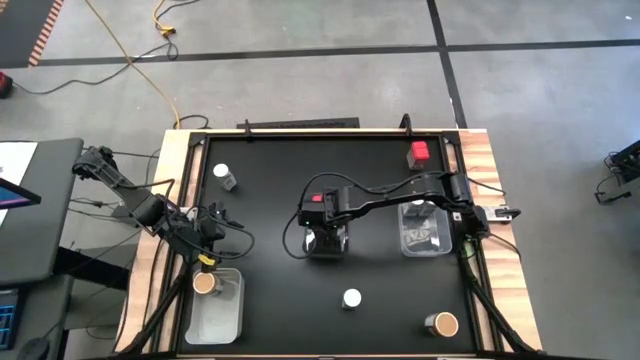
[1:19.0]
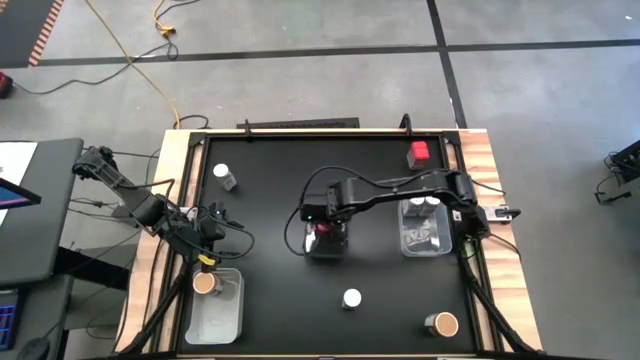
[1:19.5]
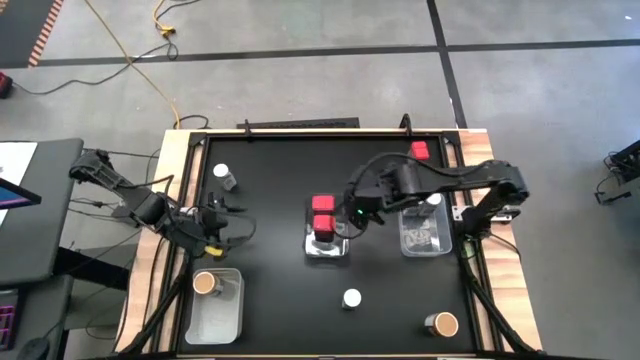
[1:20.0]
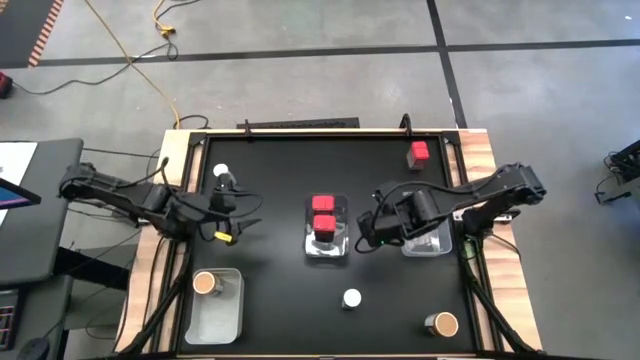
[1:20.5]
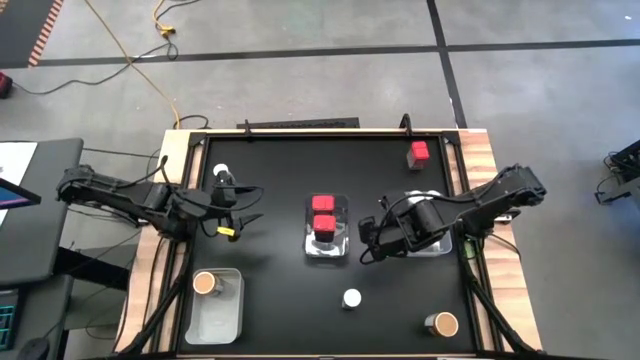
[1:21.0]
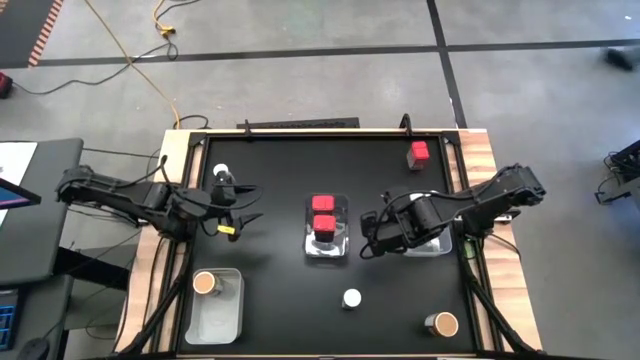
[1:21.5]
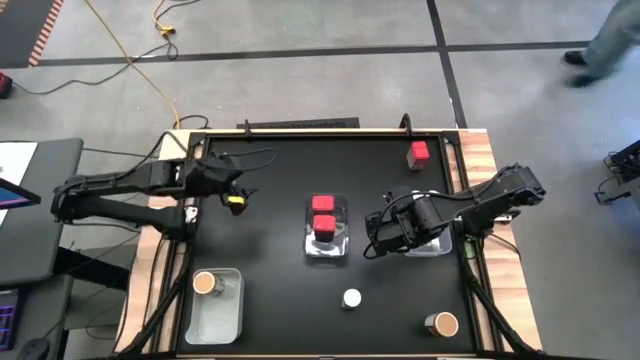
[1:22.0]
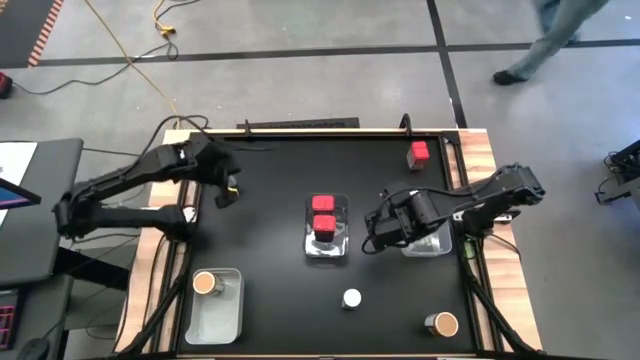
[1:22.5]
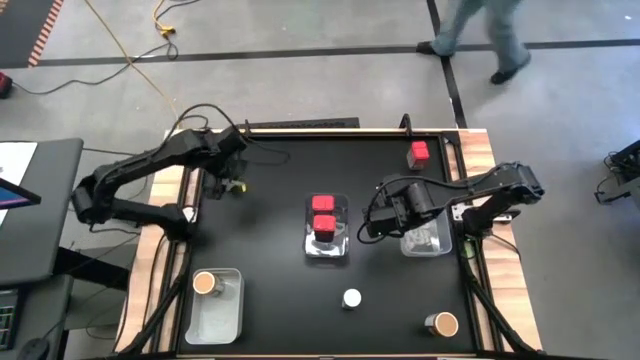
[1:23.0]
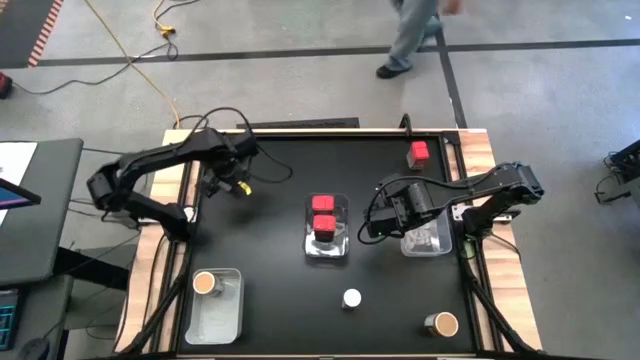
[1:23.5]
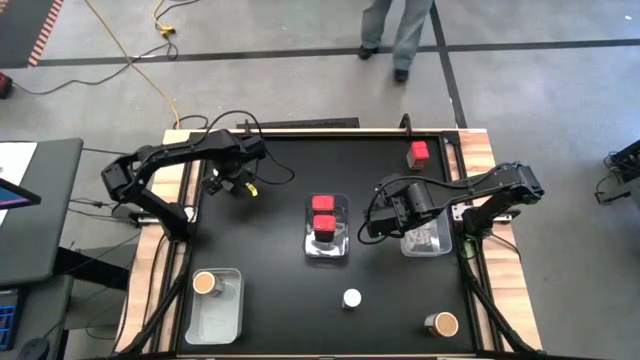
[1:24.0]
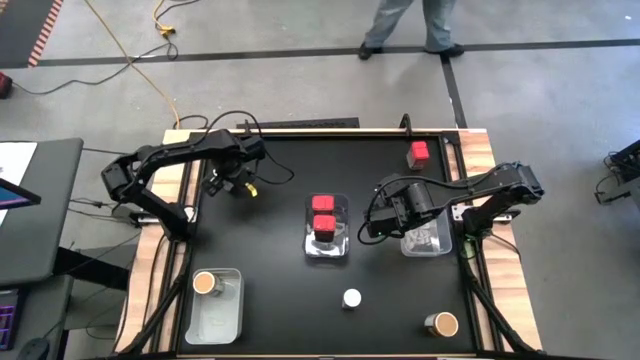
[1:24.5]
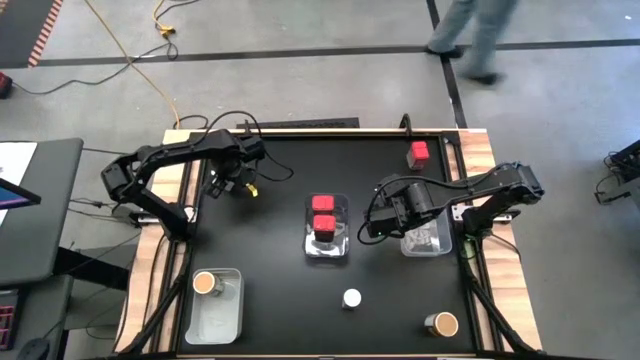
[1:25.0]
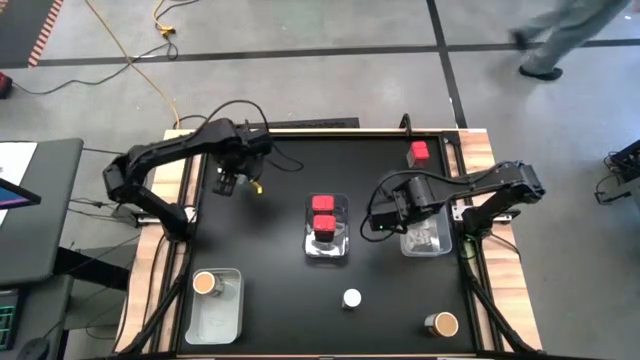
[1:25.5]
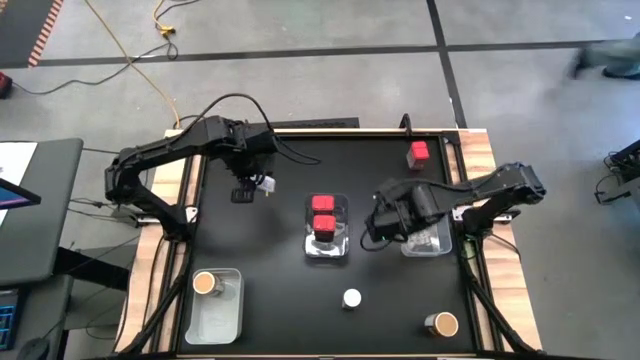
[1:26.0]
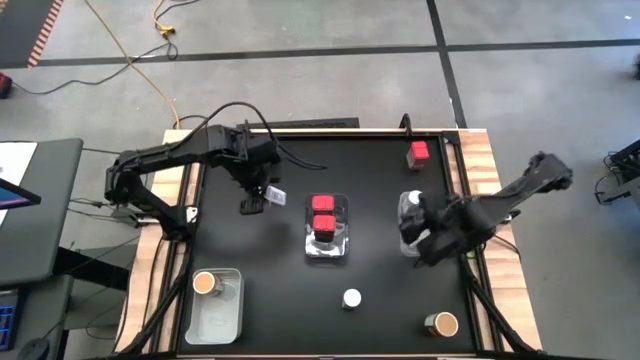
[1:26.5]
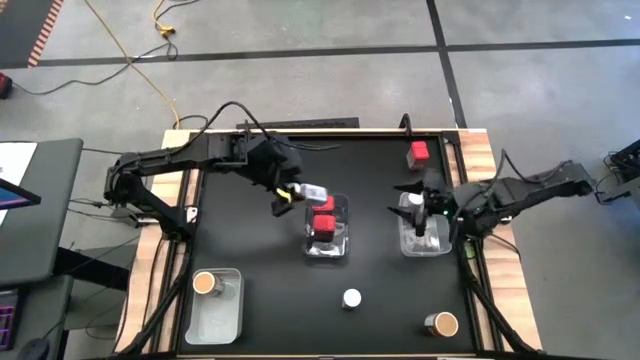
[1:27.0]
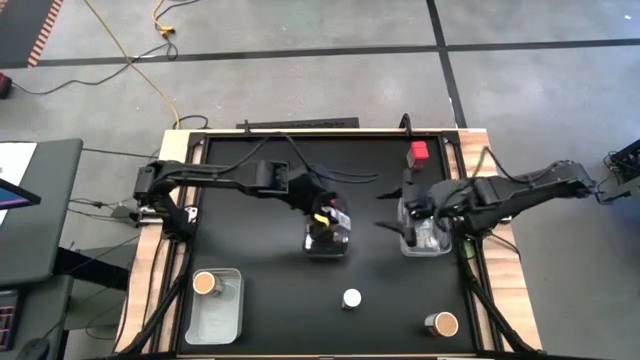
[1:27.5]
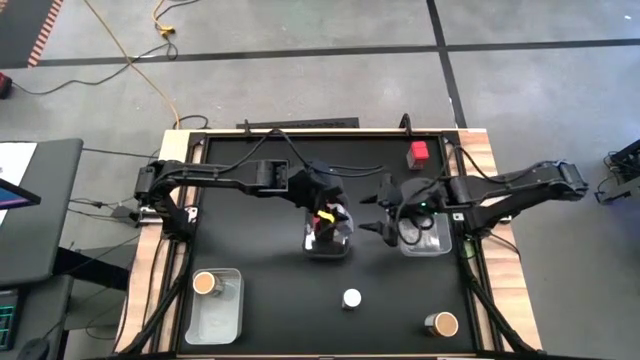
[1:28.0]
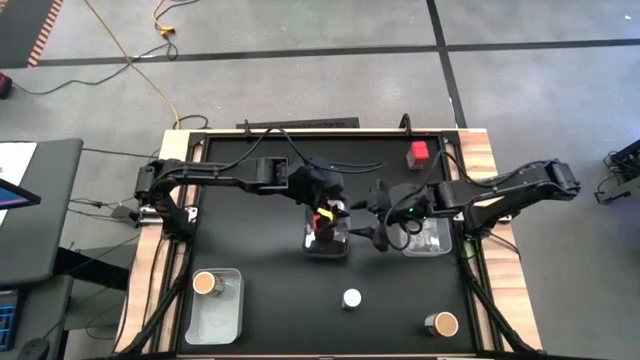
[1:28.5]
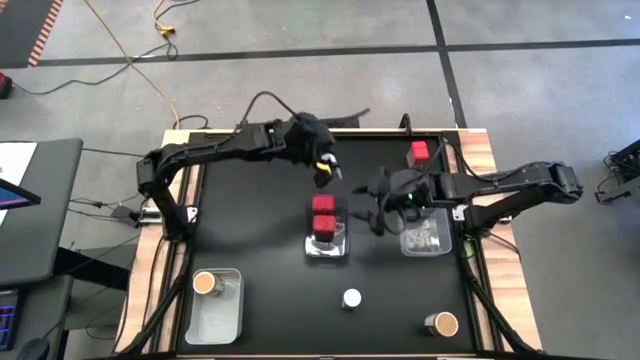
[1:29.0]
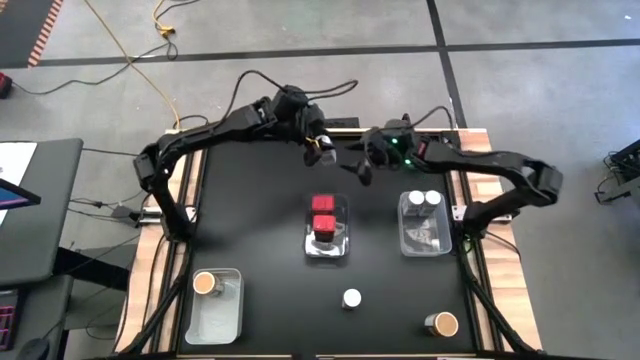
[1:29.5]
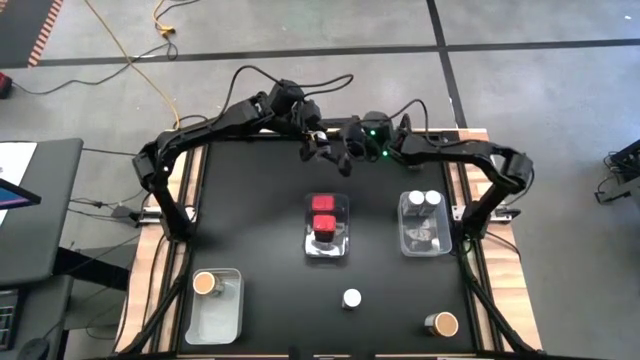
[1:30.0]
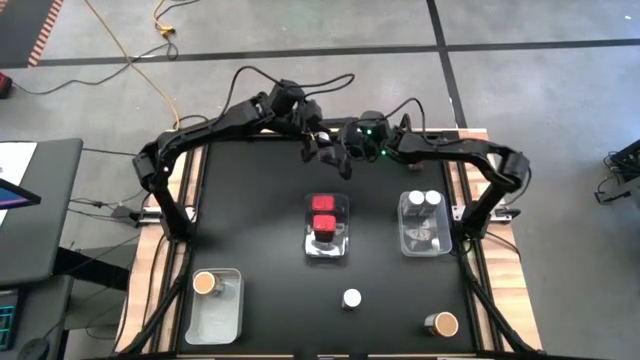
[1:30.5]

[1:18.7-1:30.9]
Task: Sort spices by type
Put the white seasoning bottle into the transparent bin

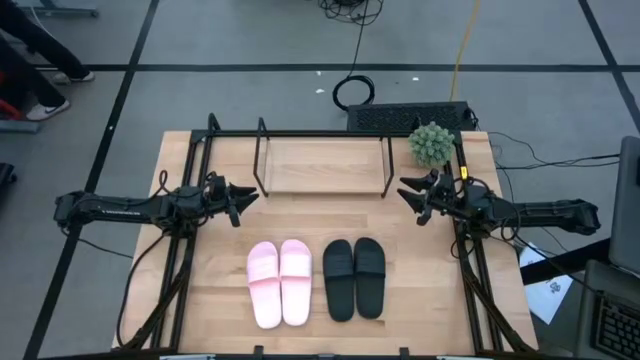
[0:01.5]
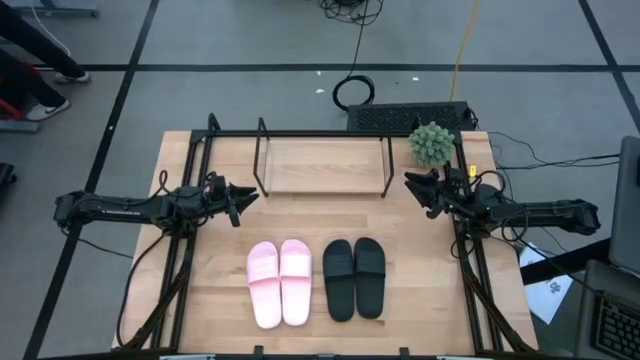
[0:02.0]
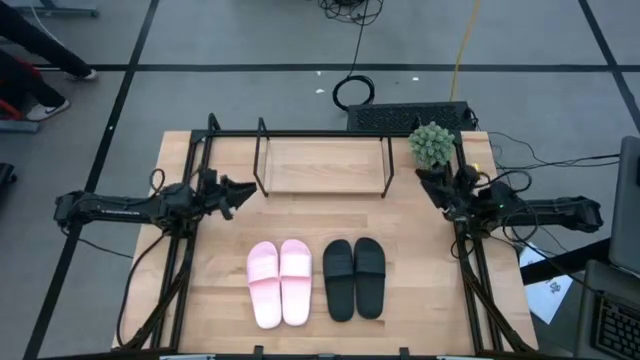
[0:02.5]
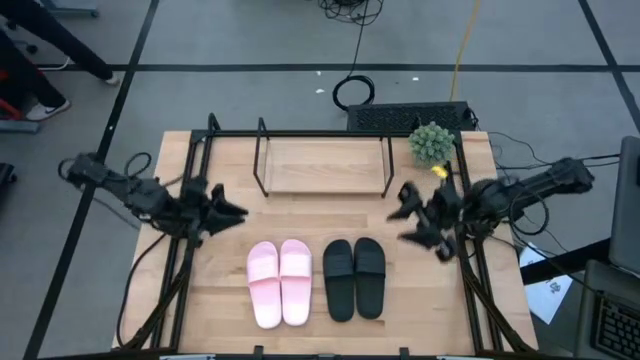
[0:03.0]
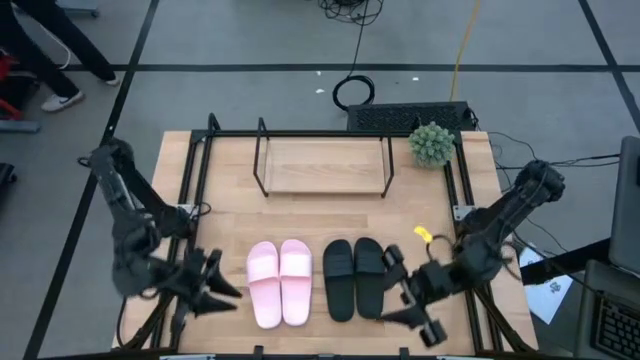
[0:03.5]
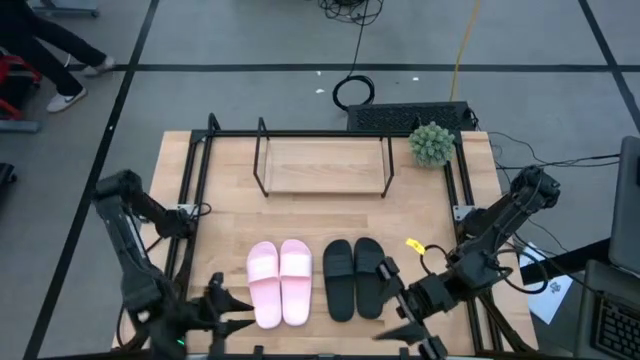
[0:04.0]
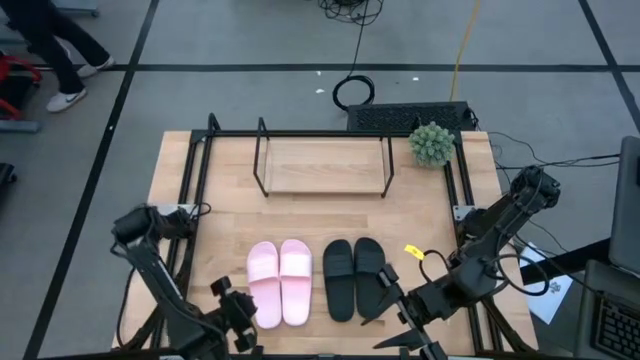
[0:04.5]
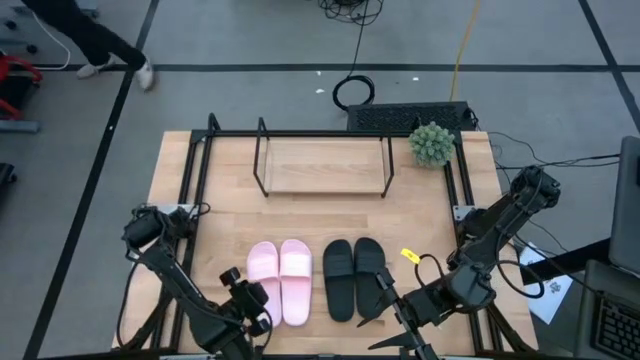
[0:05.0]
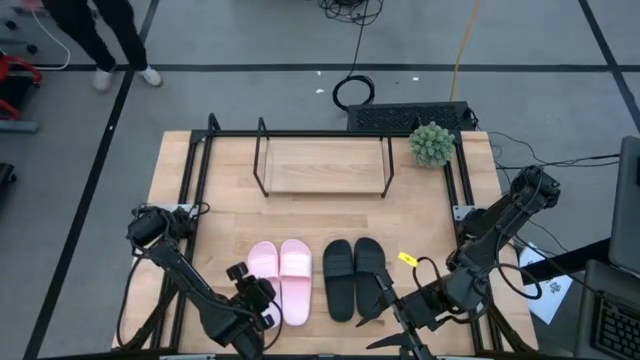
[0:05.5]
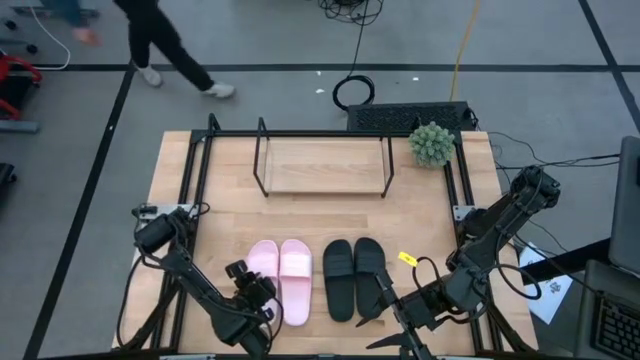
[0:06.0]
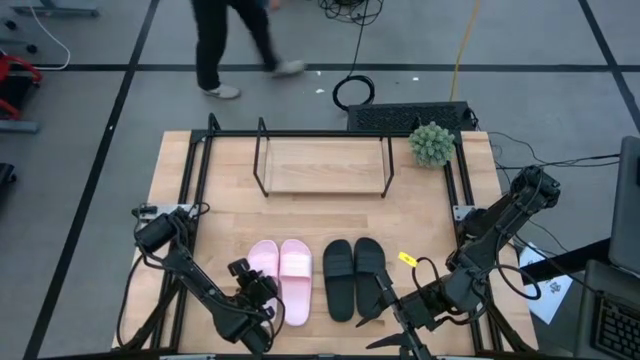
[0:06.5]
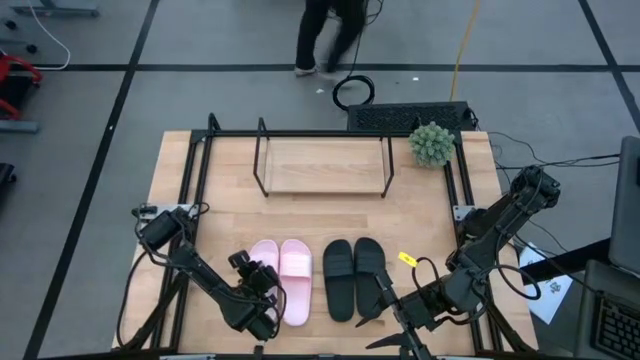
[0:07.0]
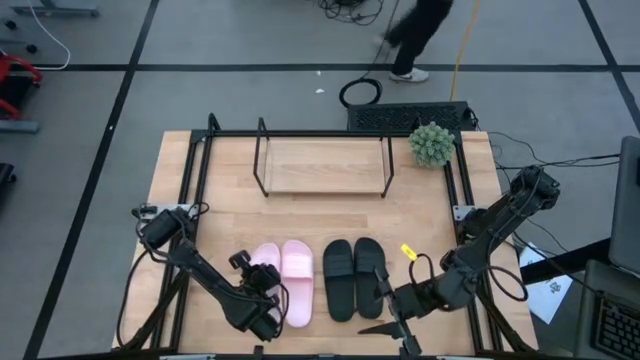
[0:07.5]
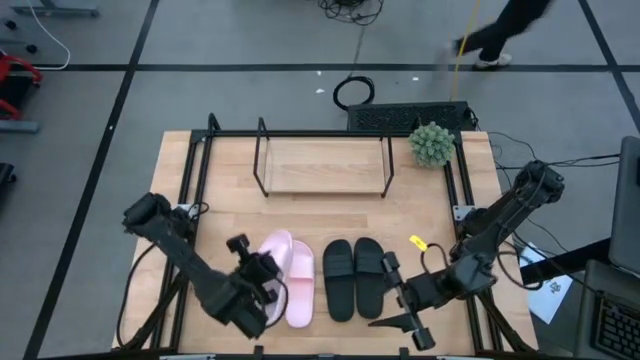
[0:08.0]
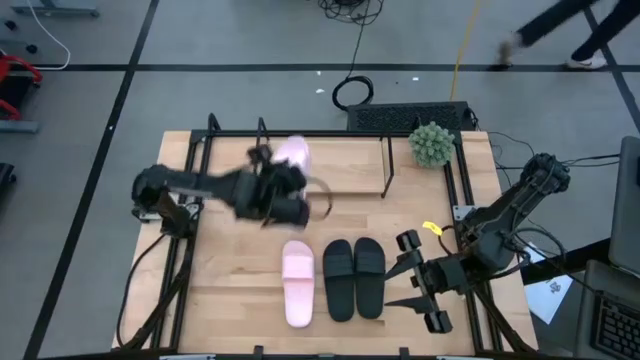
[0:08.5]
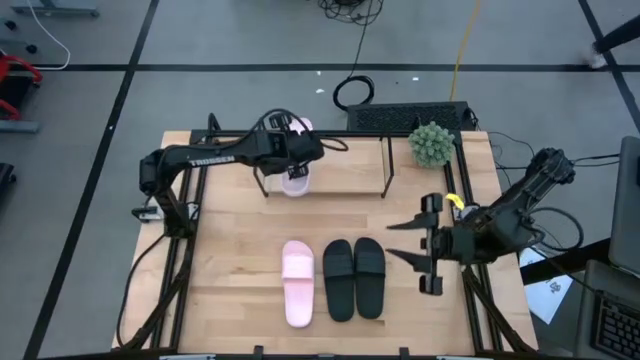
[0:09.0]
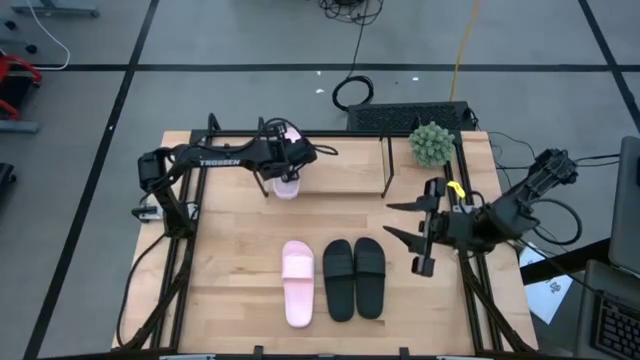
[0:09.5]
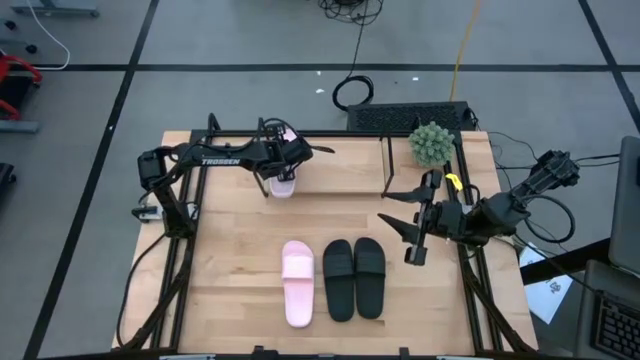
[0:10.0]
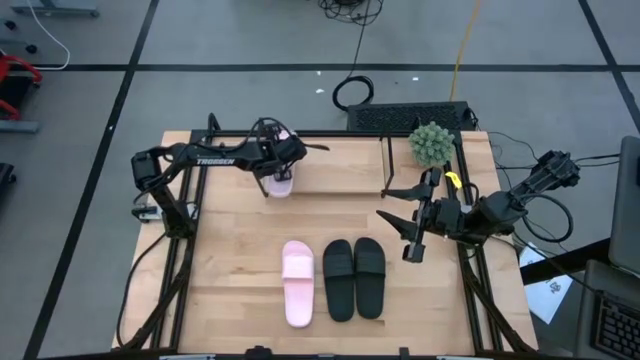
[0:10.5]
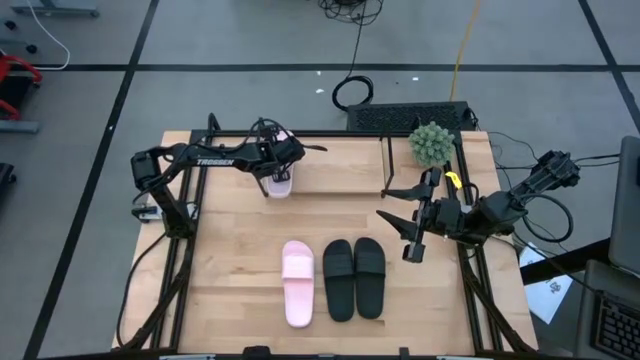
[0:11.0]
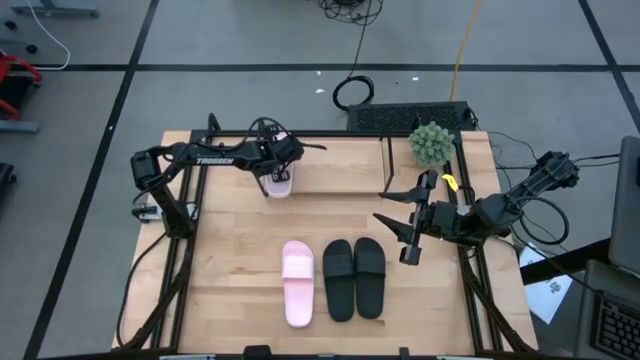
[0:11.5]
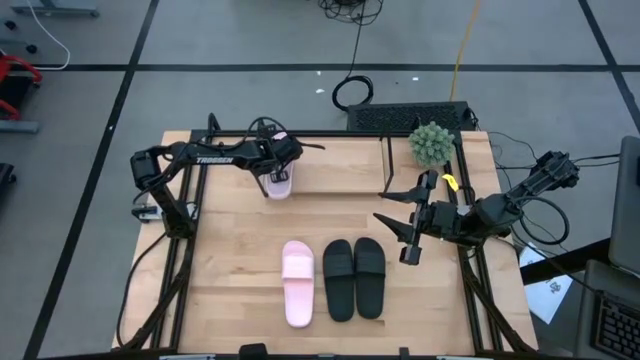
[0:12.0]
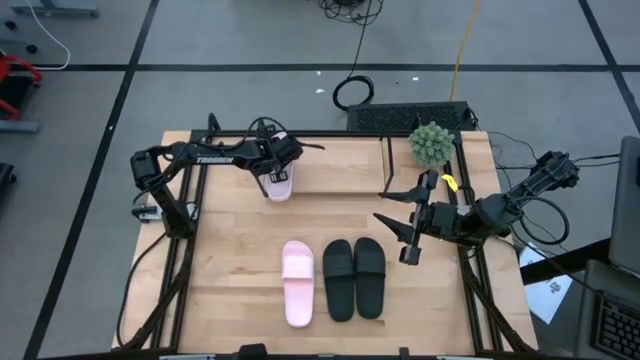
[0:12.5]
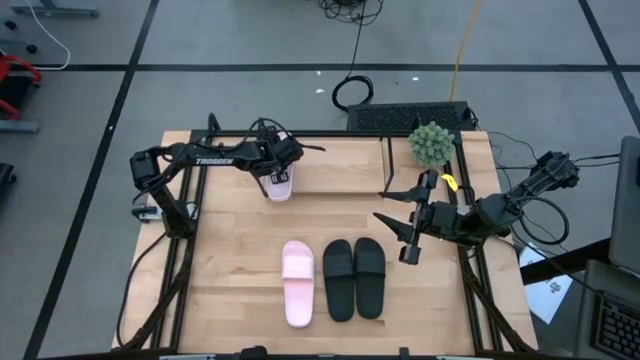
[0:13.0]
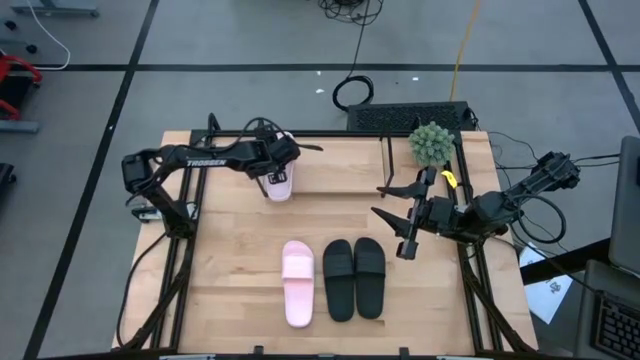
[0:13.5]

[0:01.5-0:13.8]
Task: Pick and place slides into the shelf
Put the left pink slipper on the shelf
